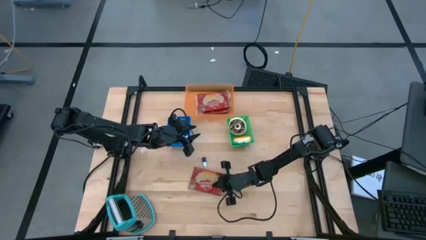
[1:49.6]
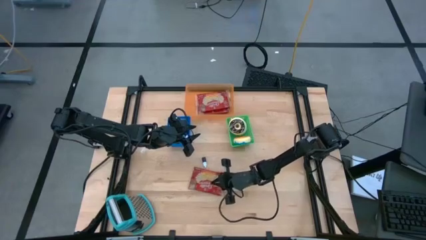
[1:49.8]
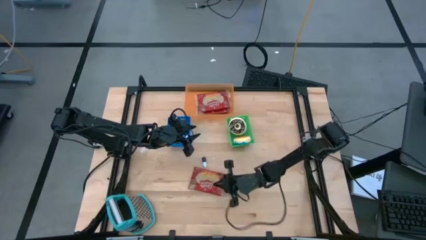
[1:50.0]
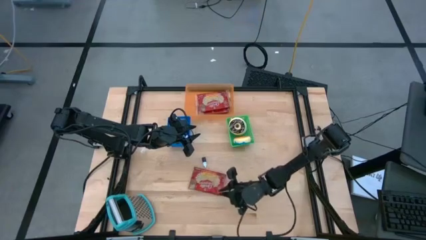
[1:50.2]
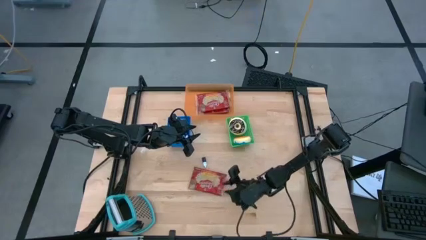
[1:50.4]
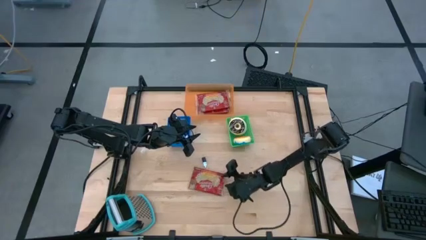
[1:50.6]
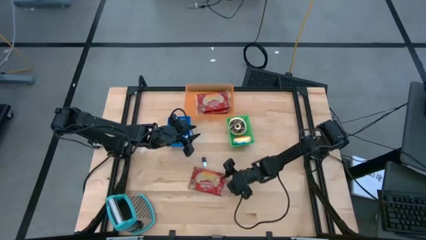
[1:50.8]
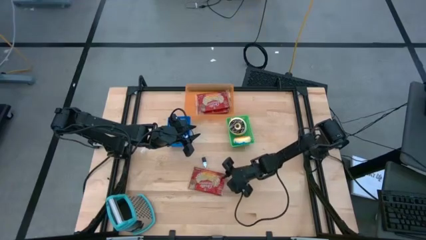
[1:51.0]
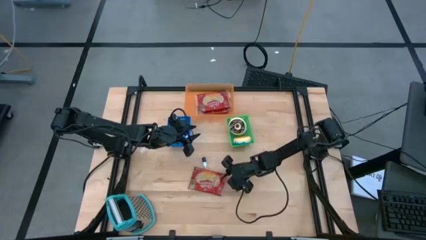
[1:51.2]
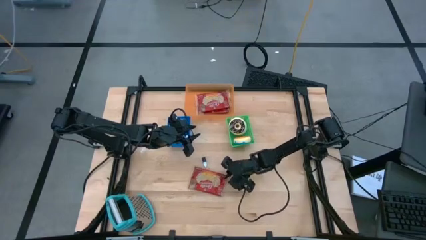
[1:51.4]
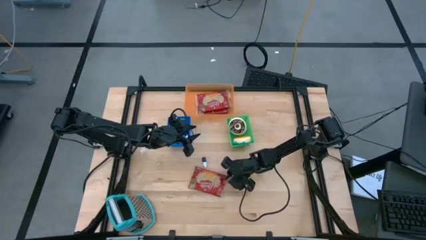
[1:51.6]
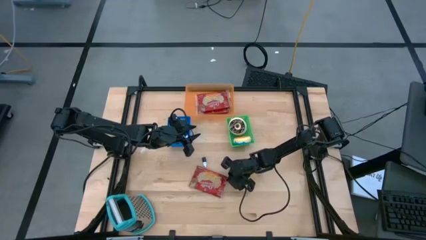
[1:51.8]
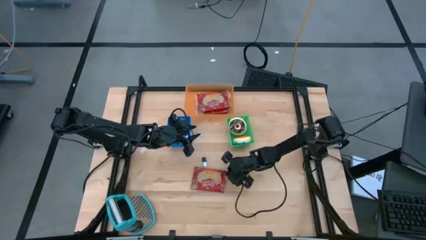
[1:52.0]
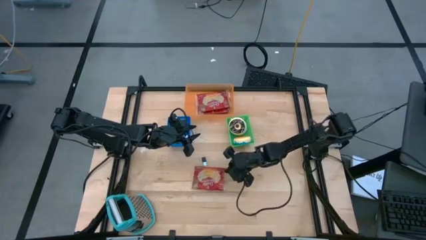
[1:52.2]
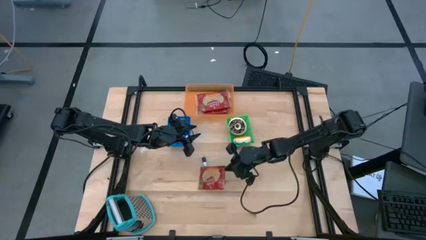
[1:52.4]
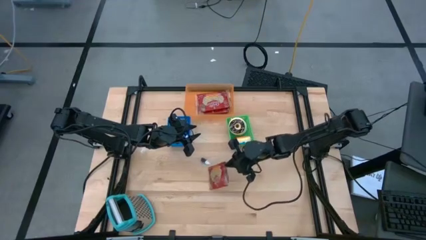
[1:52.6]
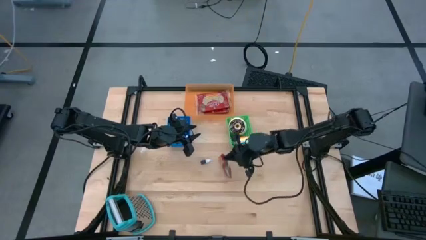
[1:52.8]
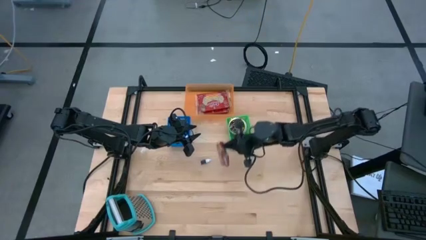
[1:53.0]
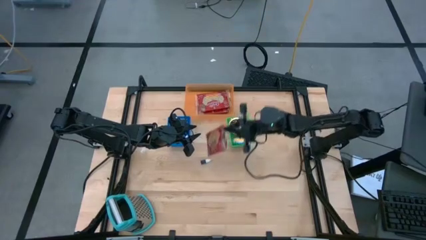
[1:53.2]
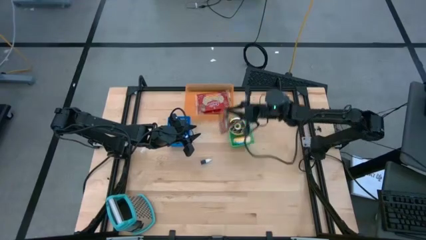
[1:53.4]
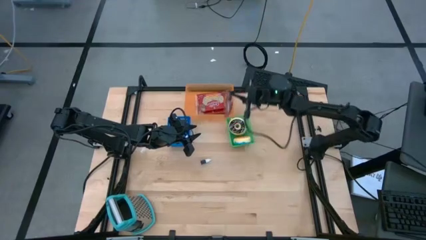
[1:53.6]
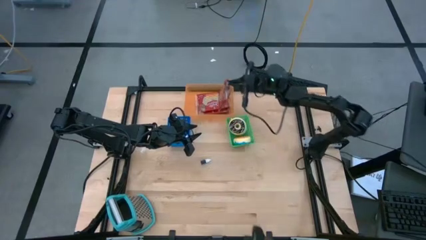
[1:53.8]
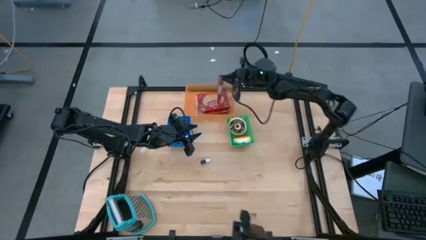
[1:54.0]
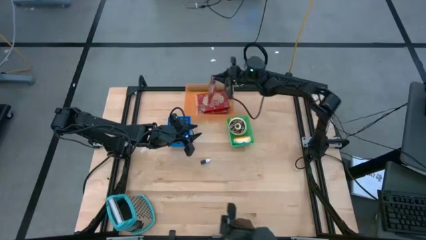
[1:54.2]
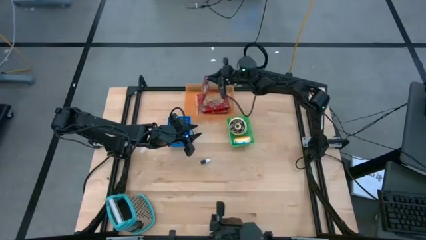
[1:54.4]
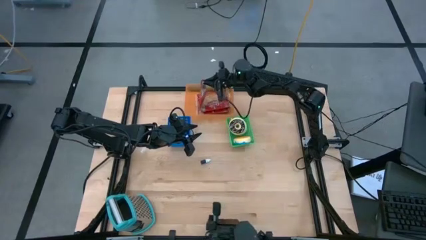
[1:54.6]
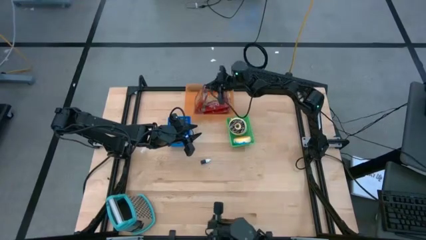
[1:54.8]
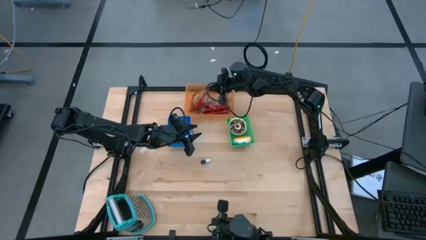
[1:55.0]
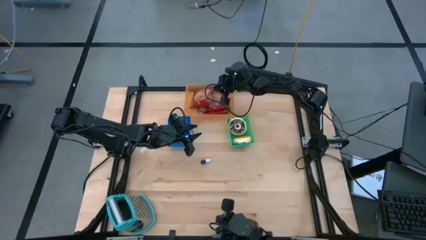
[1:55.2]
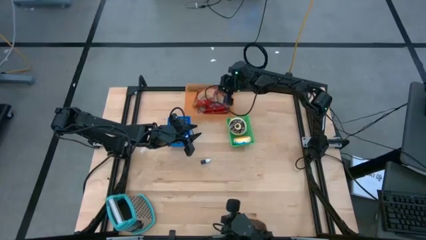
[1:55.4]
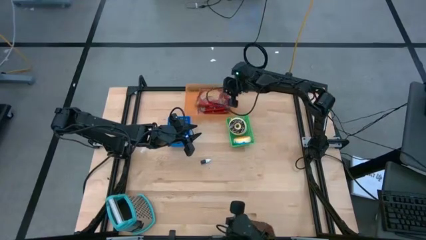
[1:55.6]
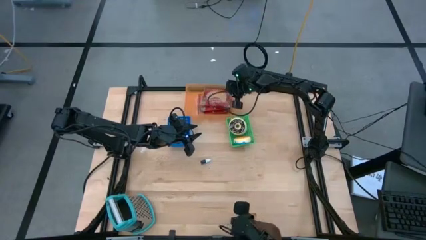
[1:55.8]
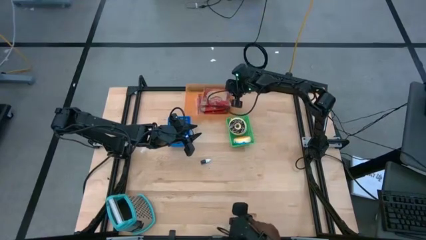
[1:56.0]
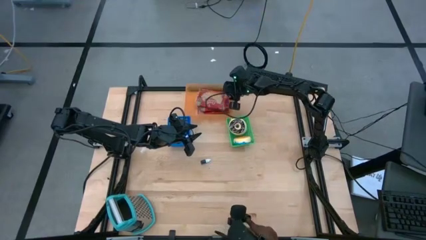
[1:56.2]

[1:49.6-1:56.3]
Put the red popcorn bag into the orange bin

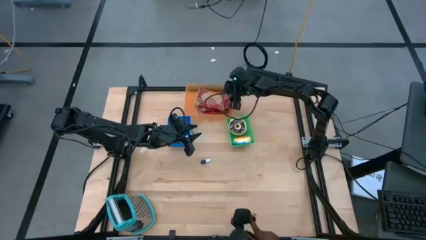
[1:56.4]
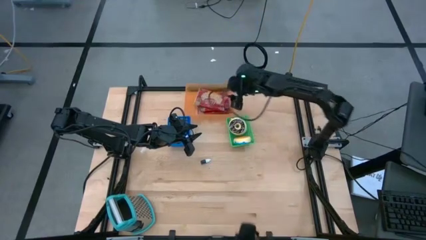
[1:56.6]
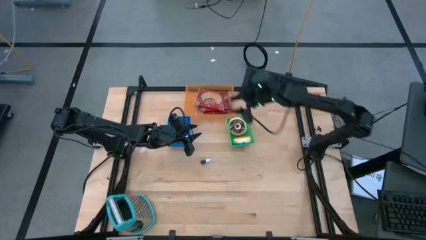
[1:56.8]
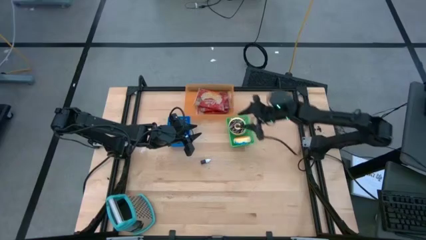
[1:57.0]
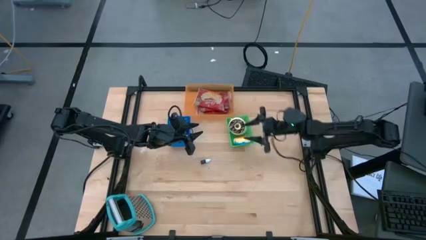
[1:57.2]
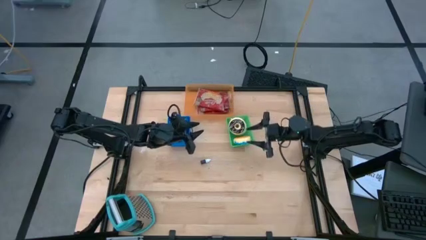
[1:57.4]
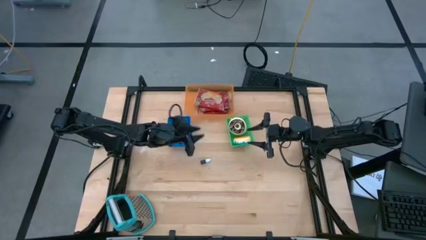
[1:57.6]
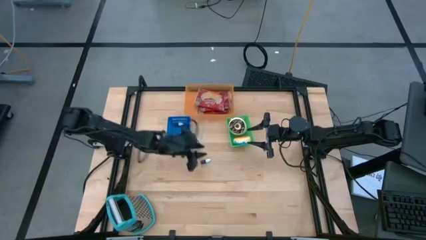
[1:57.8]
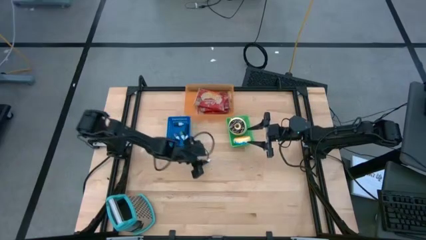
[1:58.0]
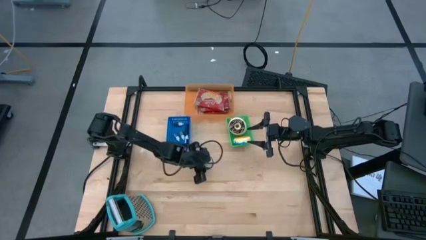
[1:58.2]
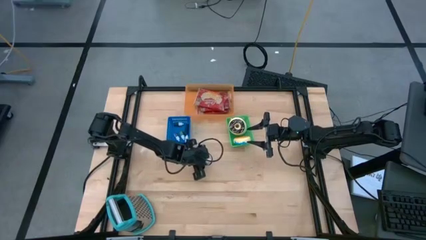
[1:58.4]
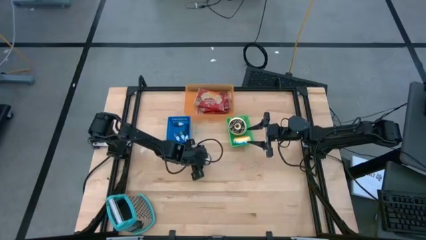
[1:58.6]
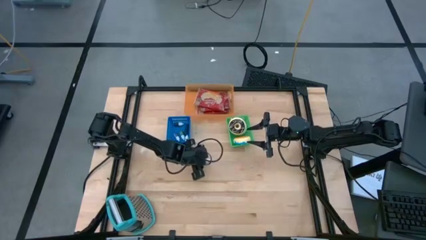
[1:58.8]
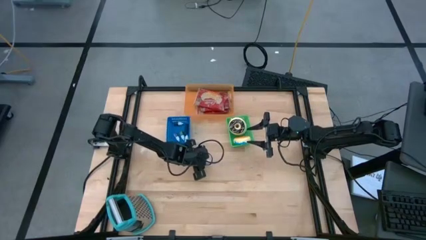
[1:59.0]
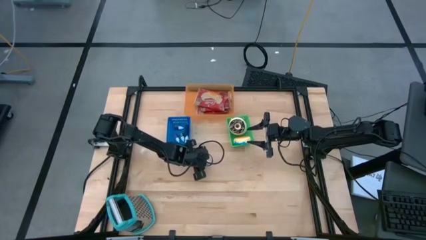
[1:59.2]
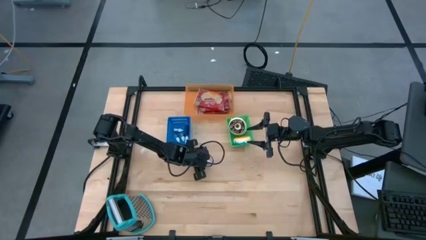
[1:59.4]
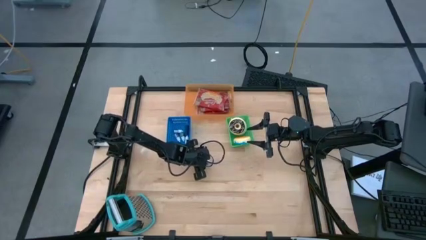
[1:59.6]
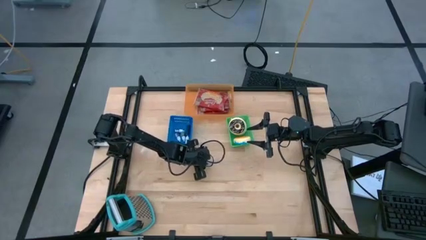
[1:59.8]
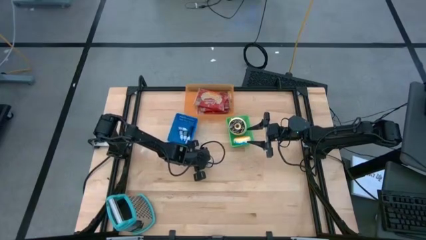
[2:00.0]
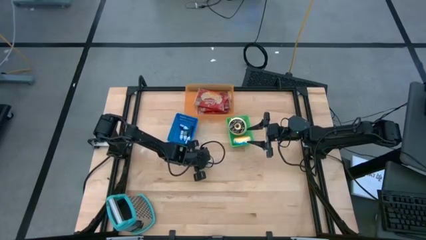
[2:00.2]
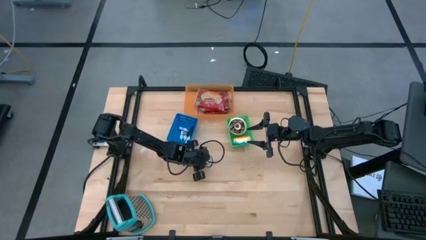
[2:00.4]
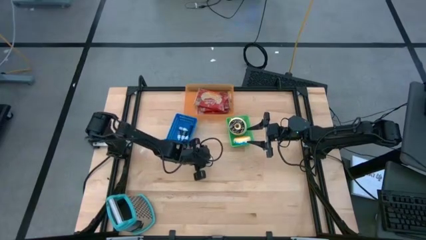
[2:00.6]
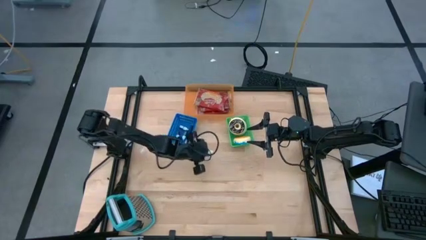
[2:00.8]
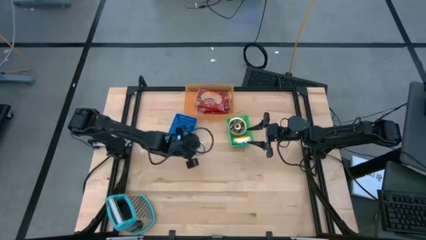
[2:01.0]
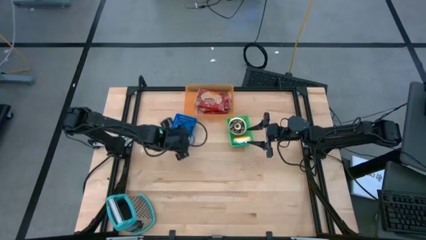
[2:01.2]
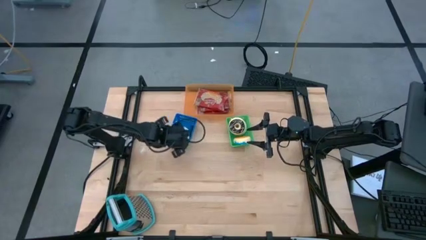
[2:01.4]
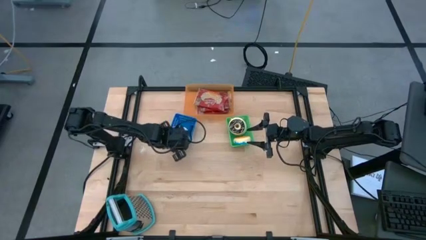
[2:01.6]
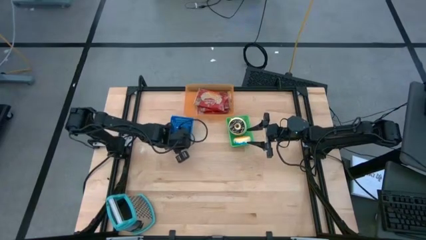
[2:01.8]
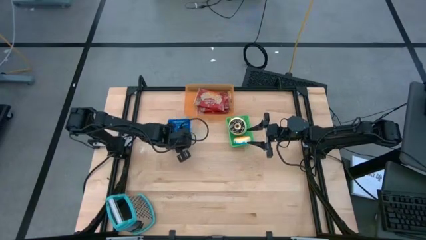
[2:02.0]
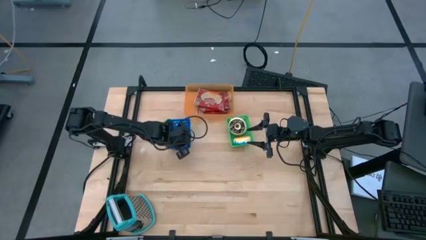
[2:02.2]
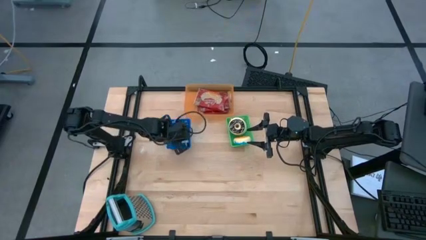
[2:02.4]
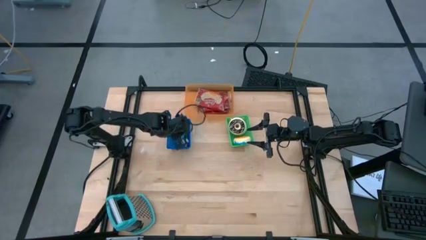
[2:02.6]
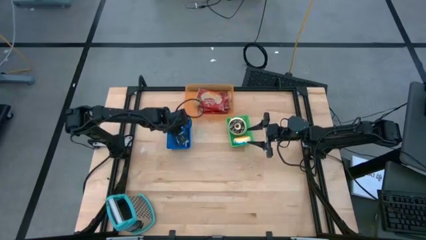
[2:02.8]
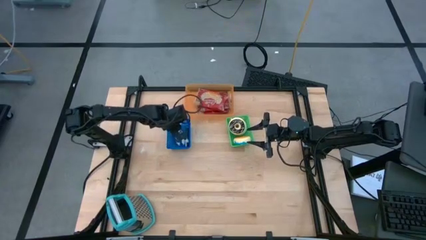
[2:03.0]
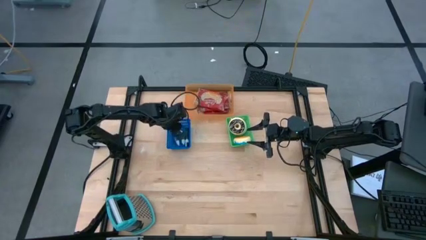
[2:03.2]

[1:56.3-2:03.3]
Put the brown food coloring bottle into the blue bin
